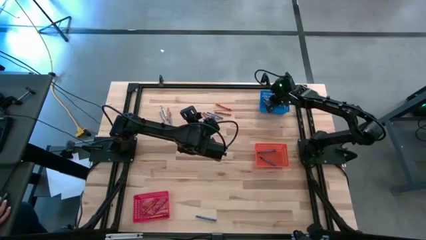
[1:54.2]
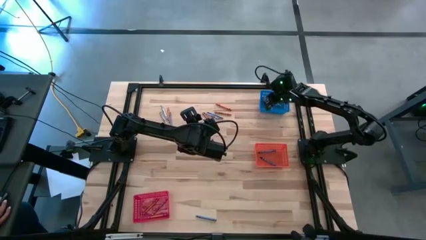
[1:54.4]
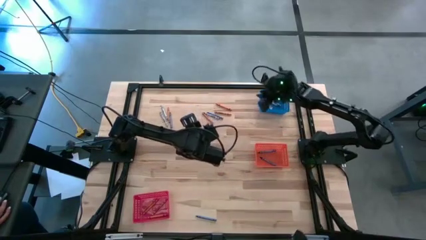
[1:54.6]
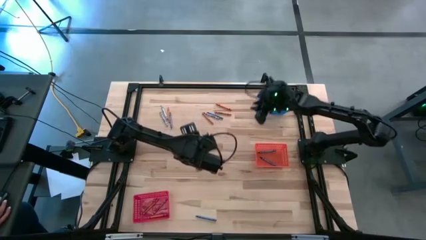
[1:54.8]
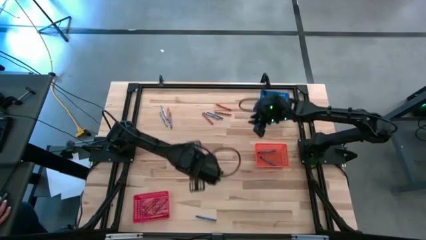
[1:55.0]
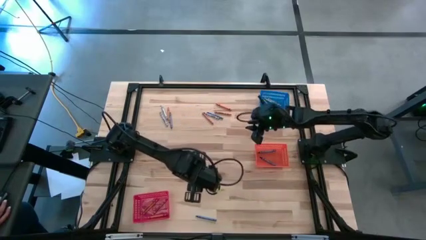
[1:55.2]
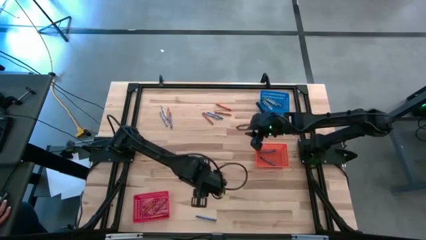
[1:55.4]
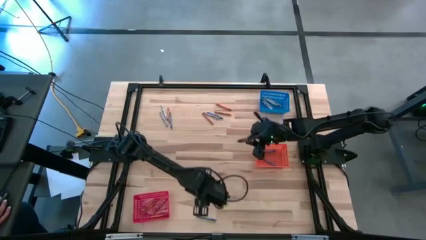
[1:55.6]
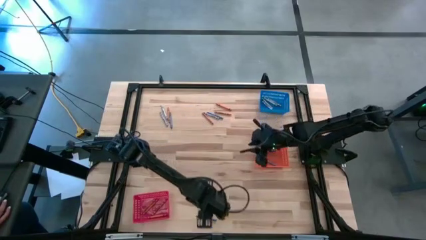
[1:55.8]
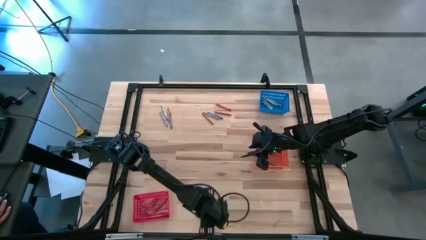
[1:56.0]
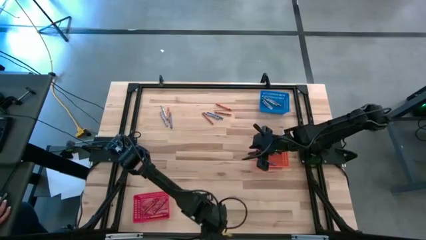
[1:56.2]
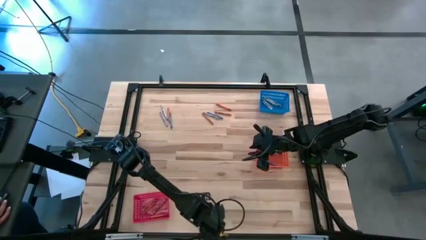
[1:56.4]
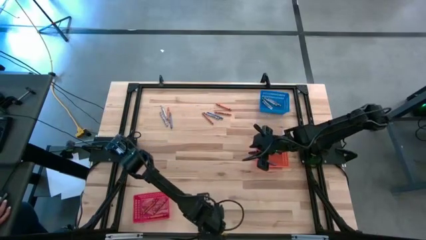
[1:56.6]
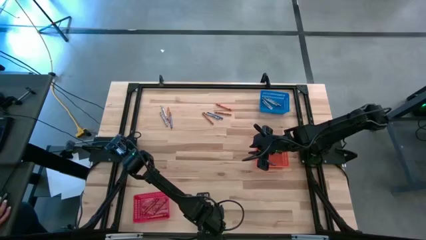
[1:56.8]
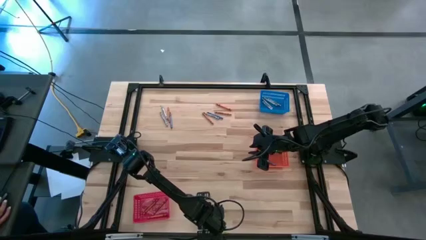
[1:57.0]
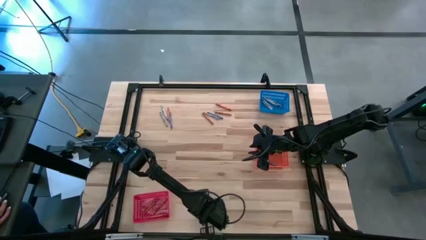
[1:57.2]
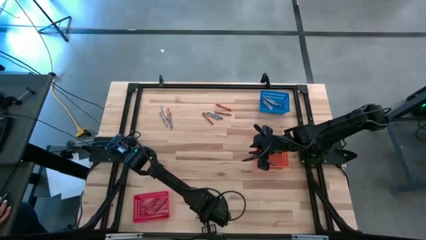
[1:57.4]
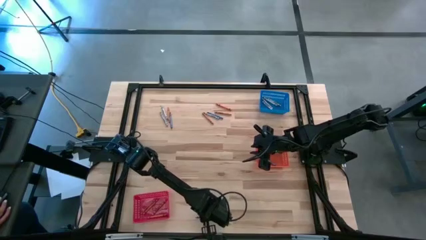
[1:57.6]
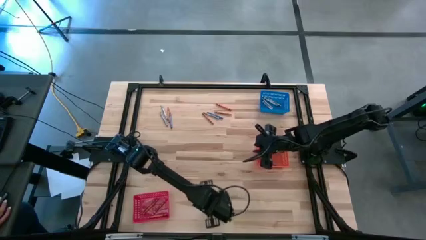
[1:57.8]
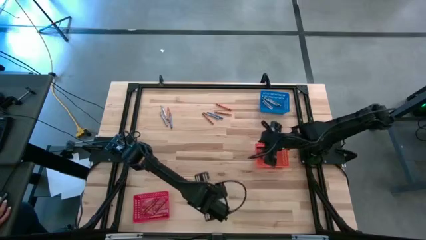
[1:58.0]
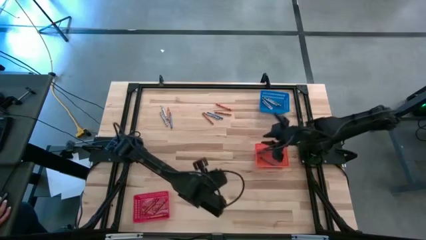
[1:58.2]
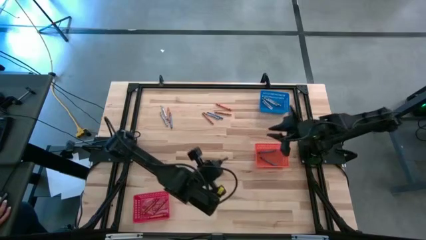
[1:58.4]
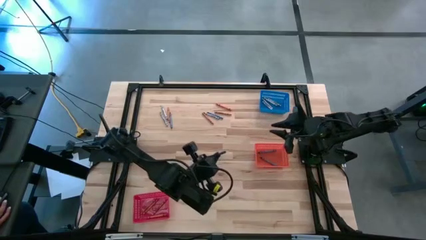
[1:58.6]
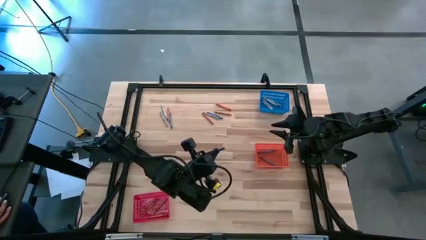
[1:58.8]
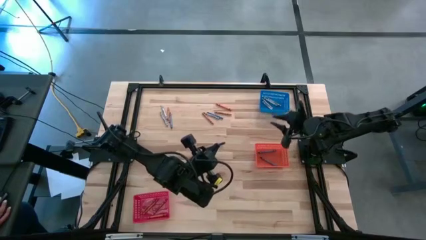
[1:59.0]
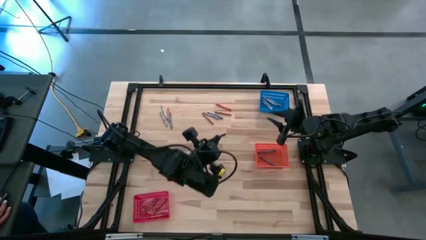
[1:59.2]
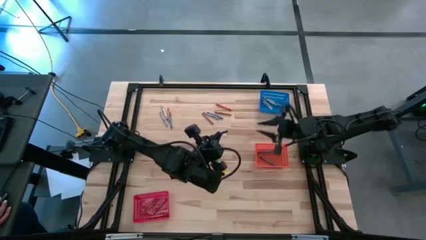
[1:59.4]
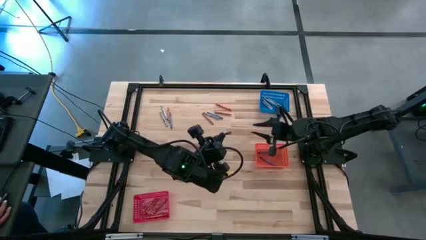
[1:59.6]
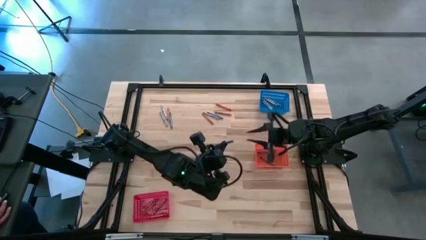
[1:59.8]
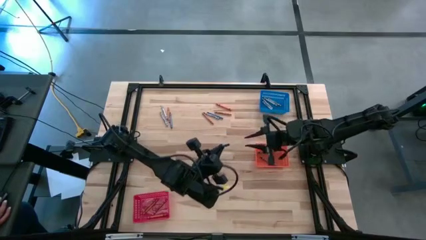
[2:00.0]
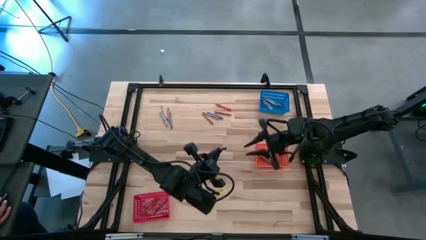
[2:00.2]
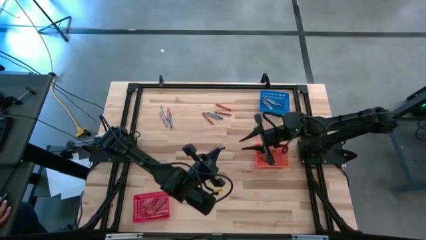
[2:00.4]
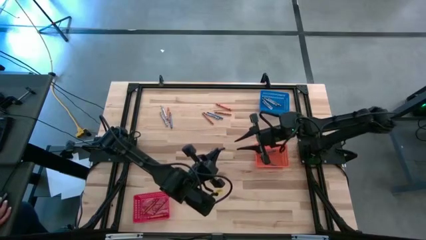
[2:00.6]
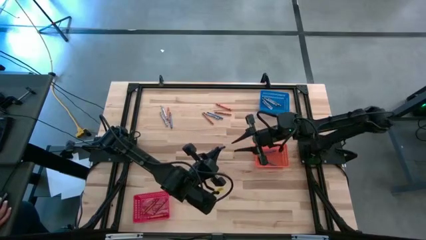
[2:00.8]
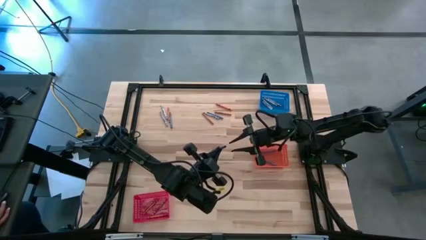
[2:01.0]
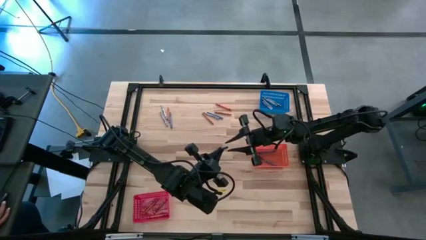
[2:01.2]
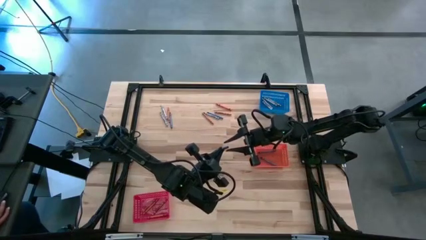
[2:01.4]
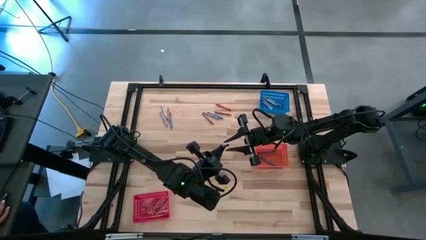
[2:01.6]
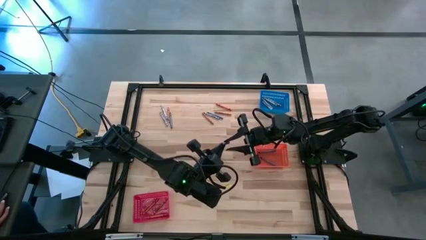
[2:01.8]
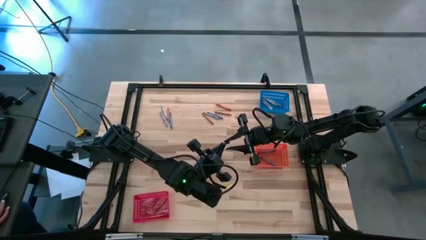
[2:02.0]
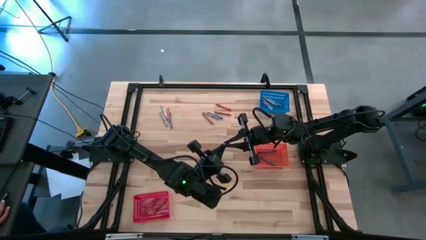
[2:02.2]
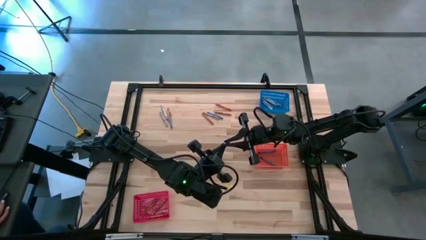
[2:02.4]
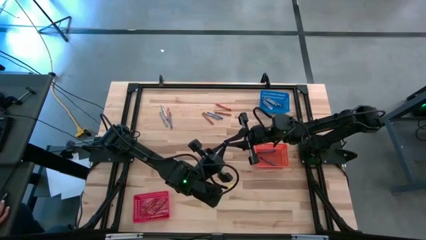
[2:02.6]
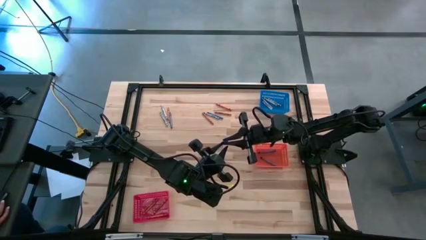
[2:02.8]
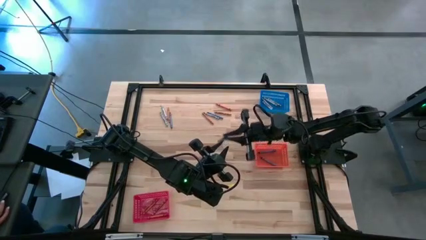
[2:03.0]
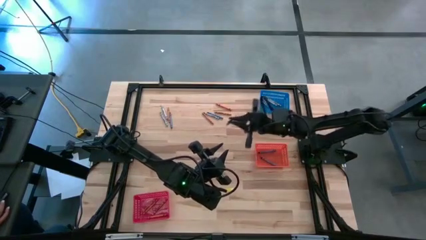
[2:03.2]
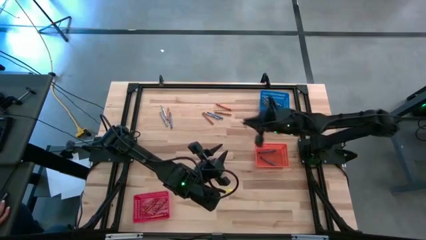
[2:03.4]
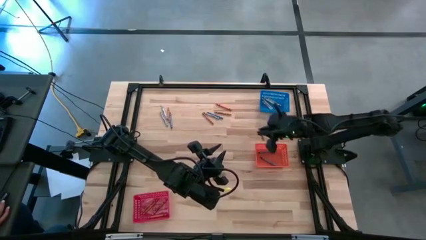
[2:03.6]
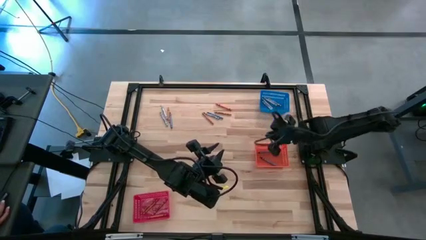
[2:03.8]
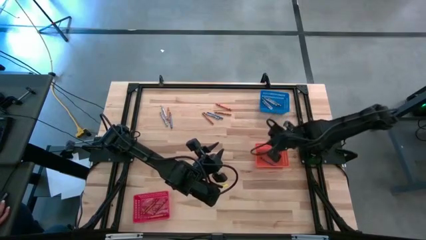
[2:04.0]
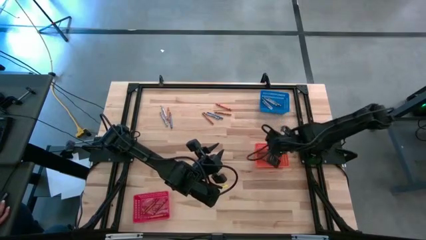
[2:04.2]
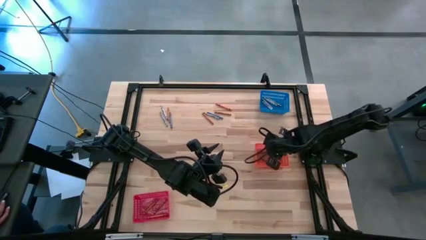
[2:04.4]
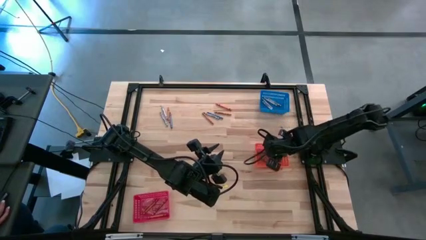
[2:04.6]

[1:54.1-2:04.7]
Task: Sort crayons
Put the blue crayon into the orange bin

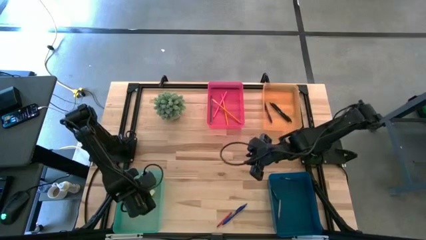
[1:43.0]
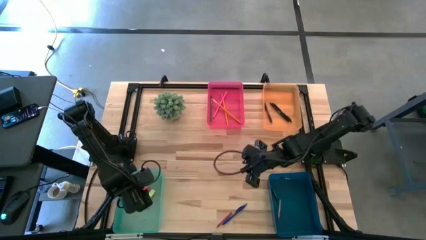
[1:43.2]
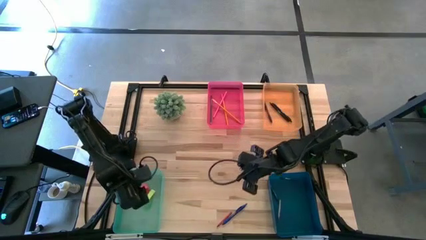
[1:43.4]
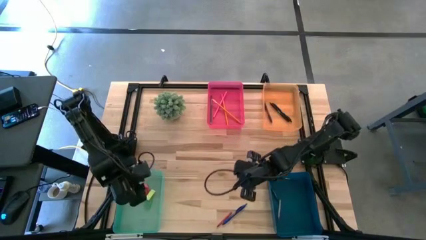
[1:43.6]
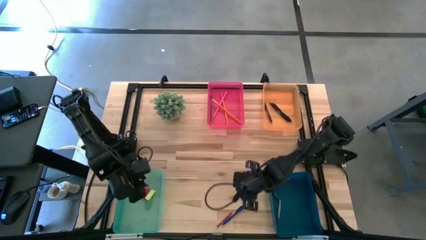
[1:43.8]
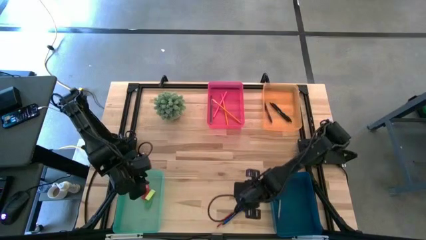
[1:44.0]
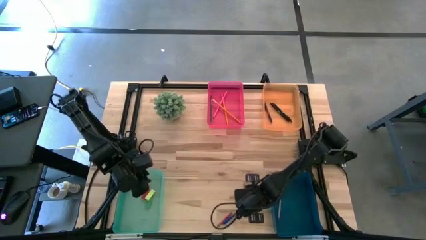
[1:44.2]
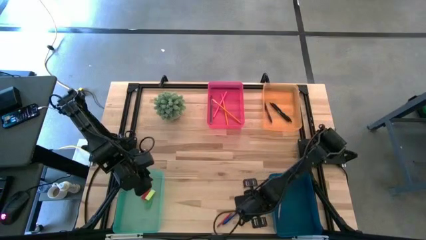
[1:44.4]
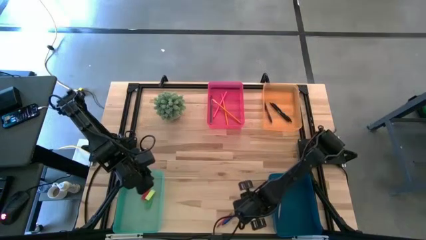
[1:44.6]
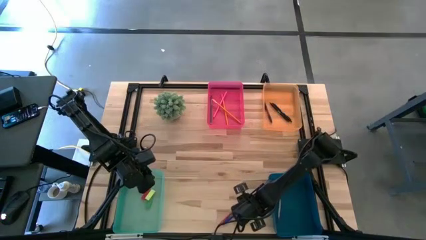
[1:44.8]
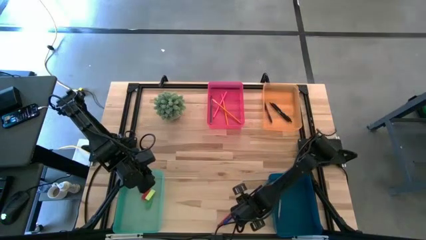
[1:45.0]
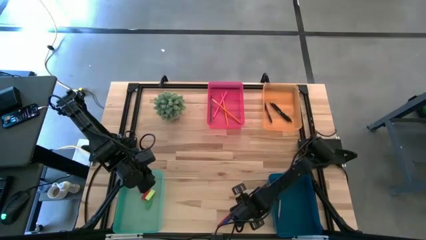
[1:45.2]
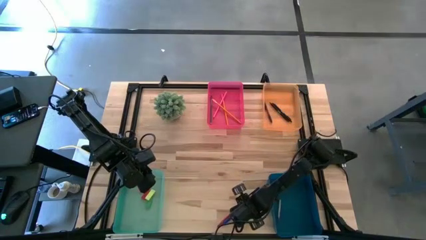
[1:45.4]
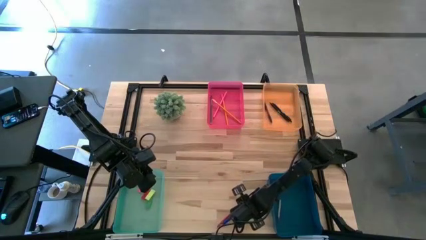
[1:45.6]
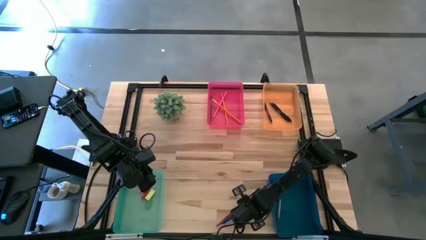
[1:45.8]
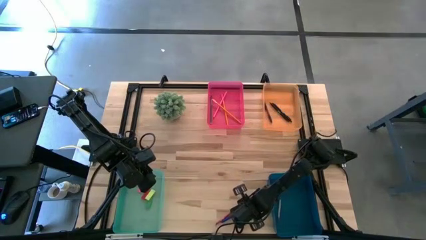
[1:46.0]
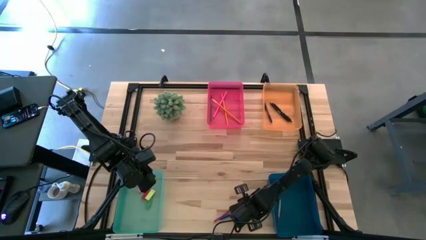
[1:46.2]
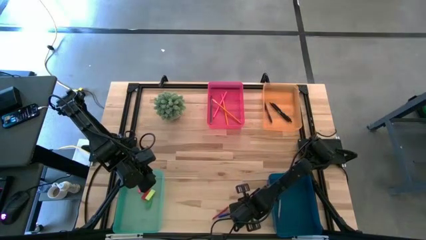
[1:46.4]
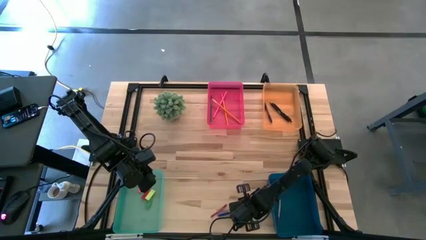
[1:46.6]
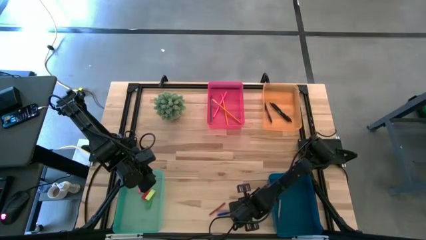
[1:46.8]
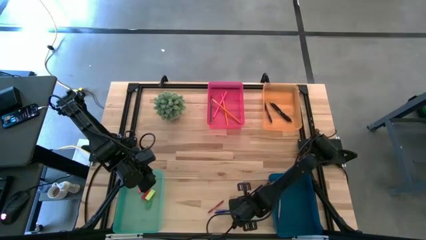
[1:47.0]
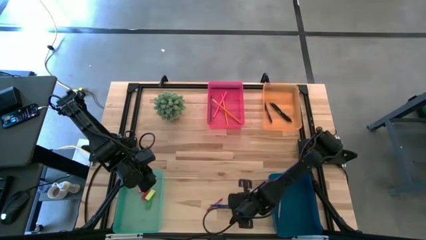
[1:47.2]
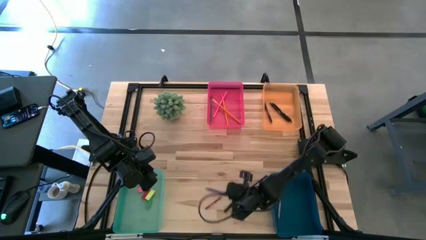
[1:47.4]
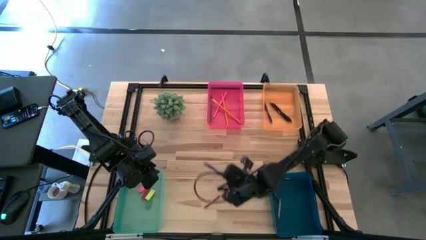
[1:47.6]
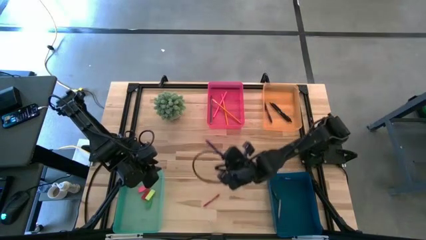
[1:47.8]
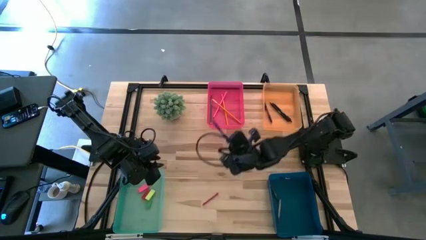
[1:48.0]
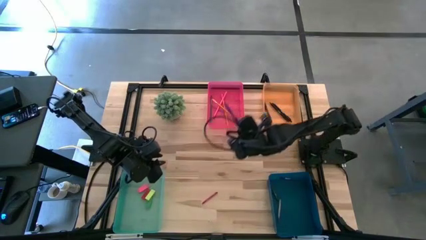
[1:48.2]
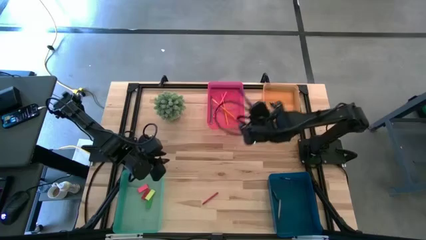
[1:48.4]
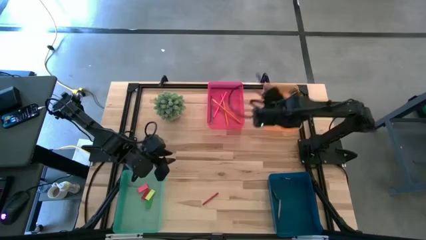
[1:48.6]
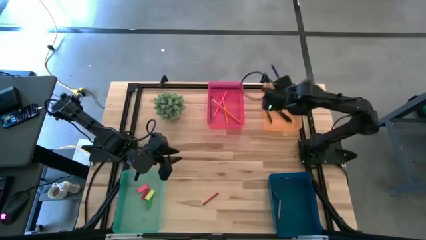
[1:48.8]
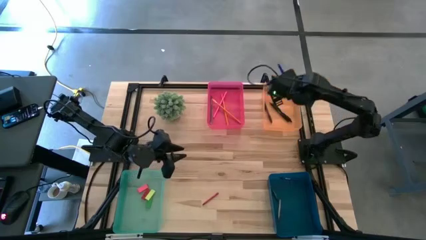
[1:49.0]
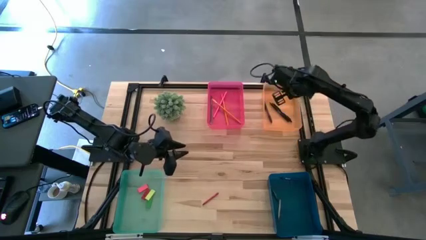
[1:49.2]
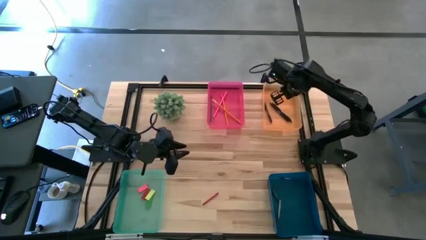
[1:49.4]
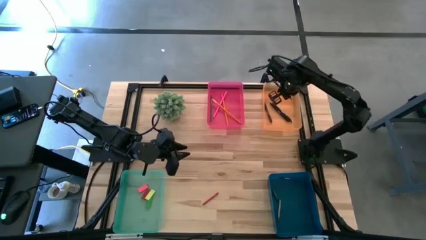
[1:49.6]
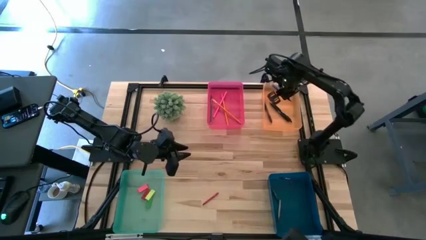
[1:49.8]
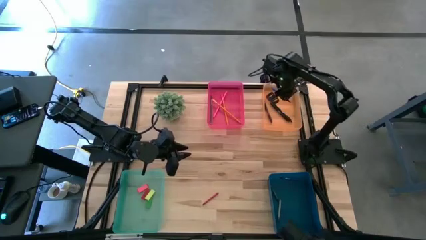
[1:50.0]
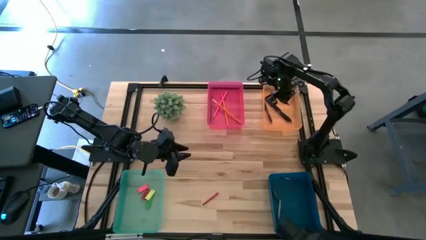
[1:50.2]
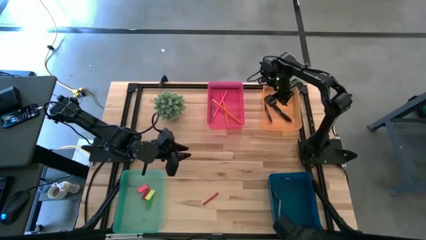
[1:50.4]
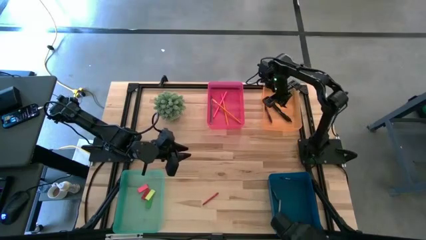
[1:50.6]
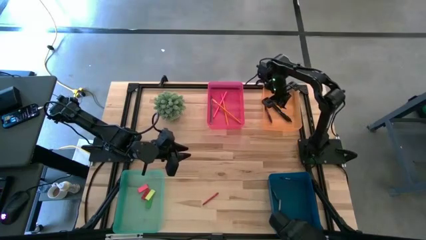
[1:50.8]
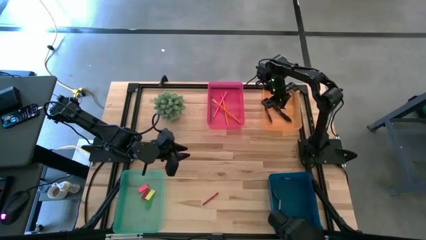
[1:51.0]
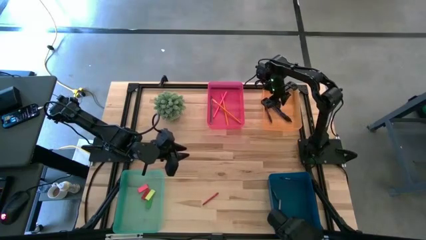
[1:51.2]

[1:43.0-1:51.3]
Task: Sort crayons/erasers/pens/pencils in bins
Put the blue pen into the orange bin
